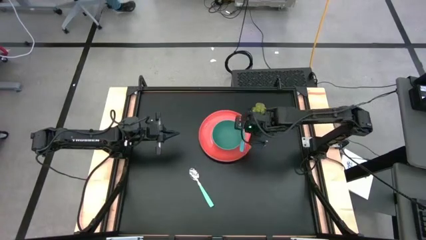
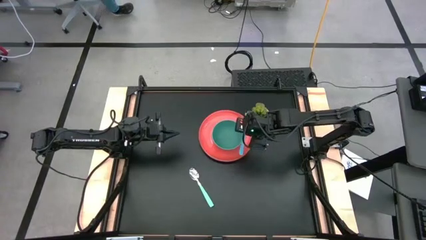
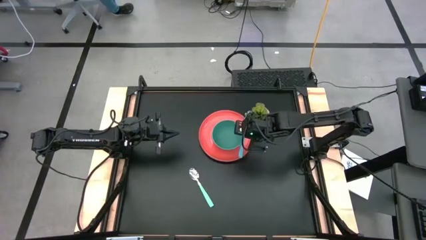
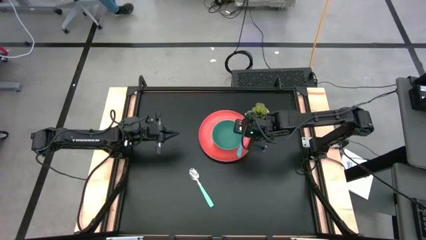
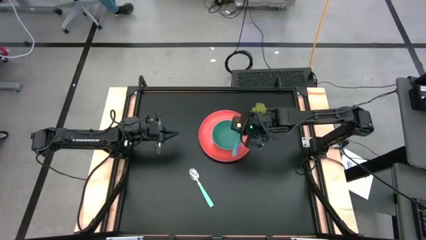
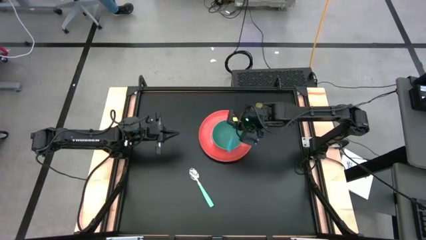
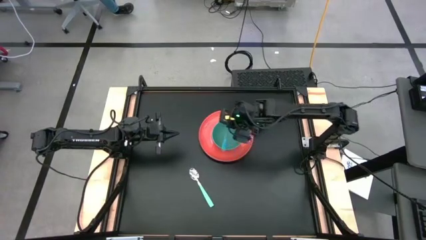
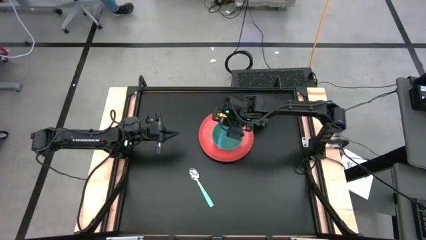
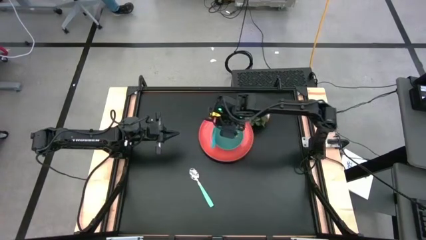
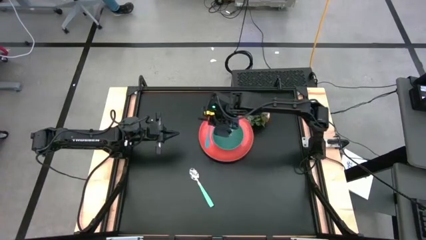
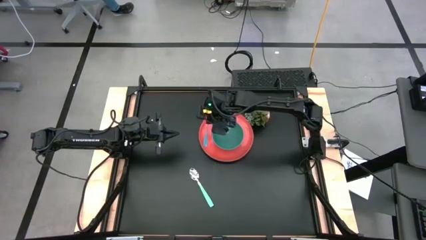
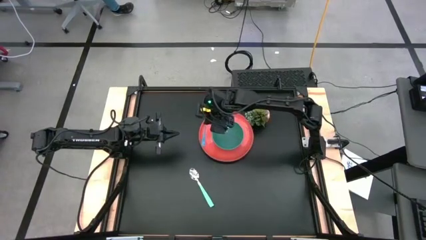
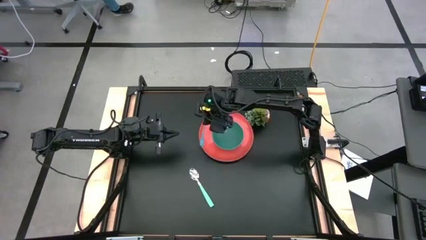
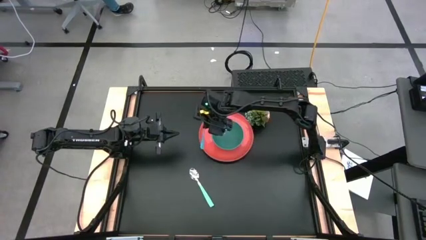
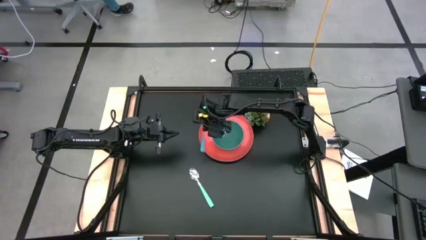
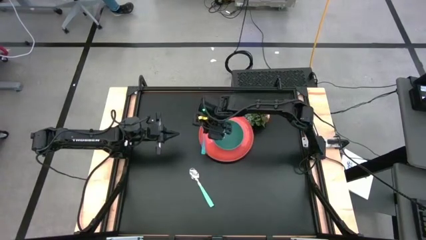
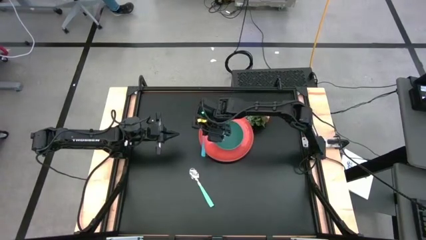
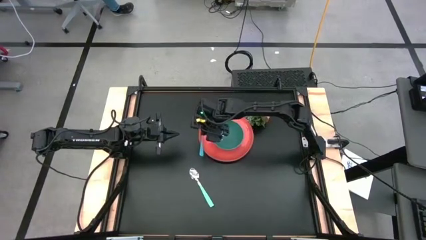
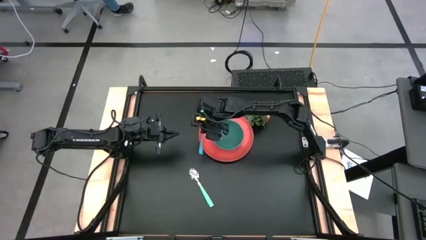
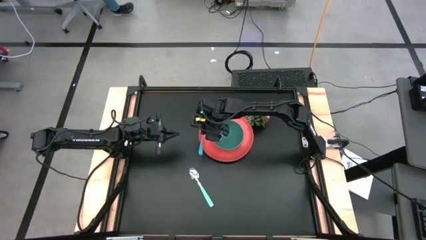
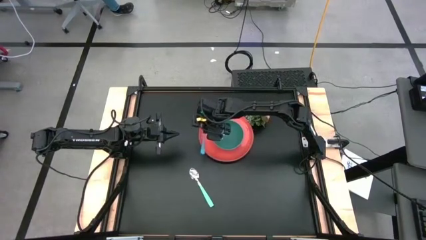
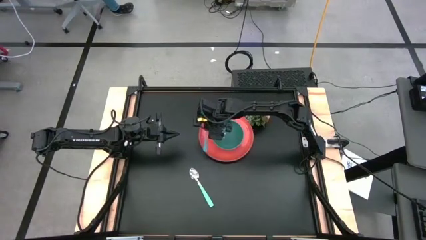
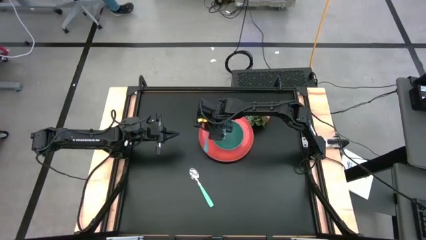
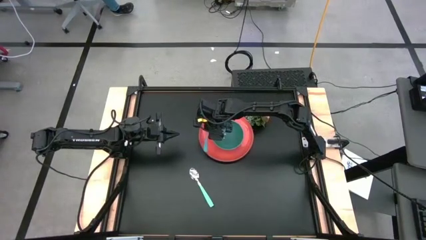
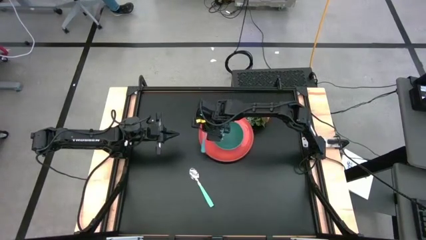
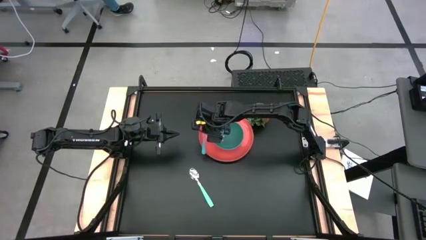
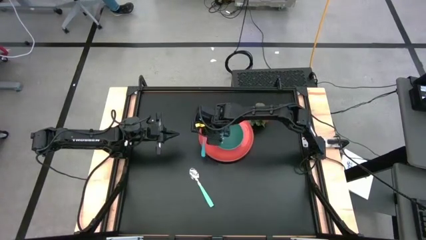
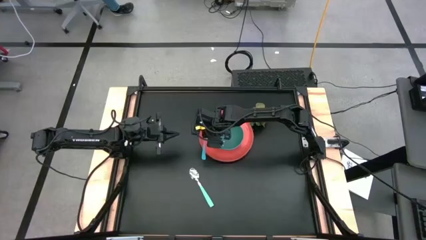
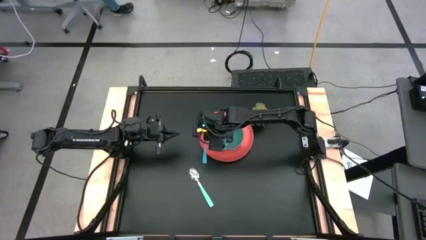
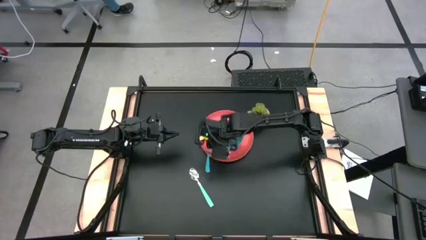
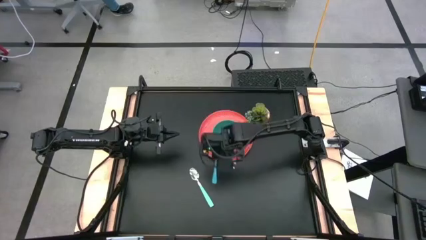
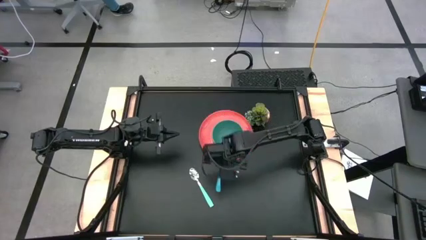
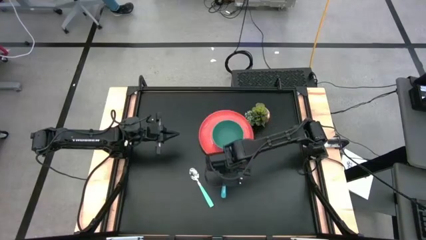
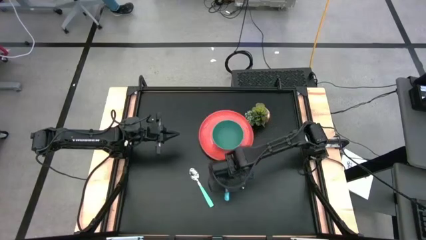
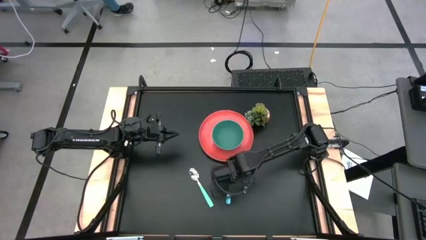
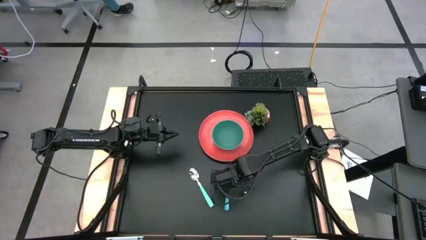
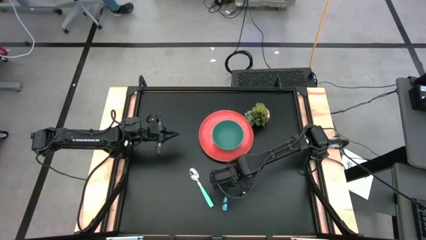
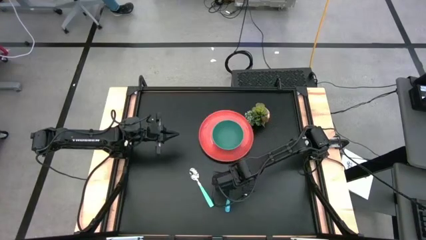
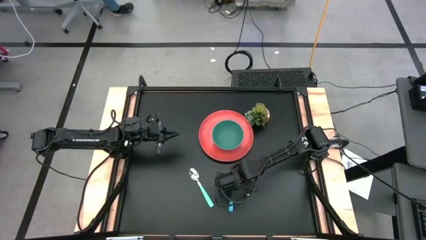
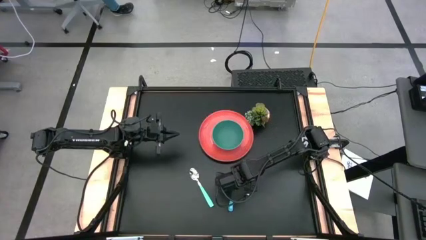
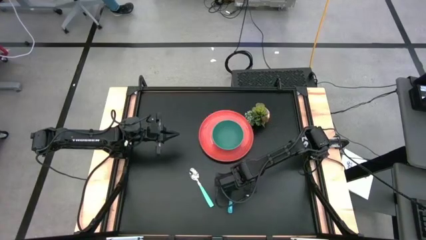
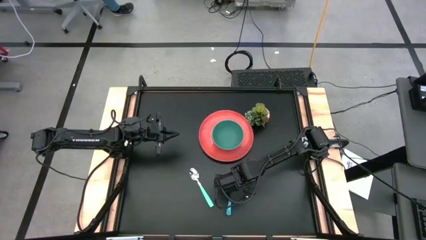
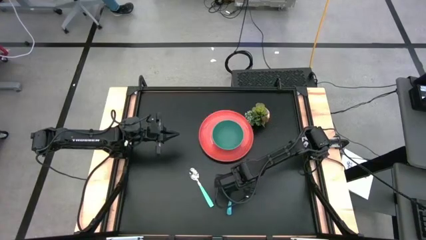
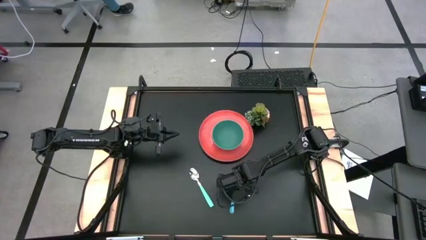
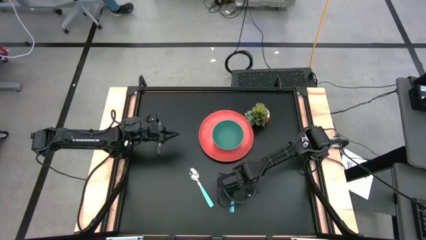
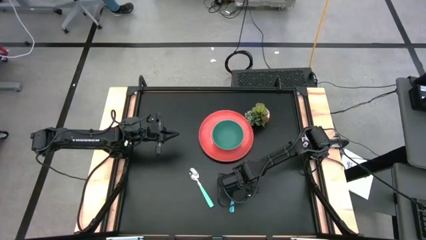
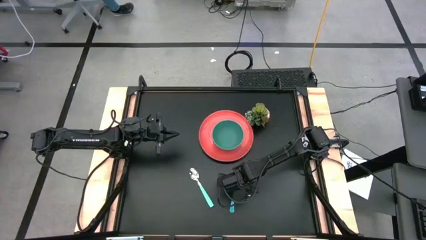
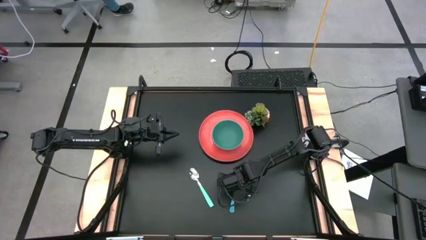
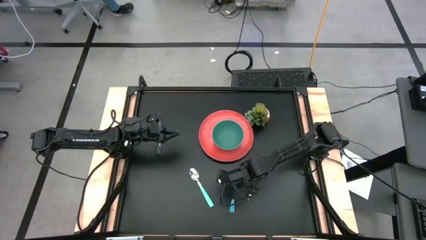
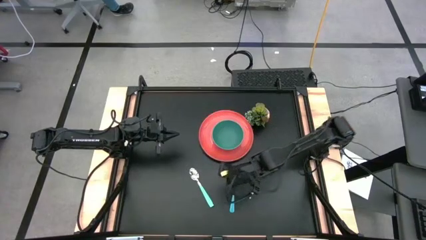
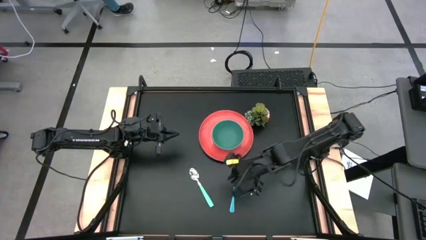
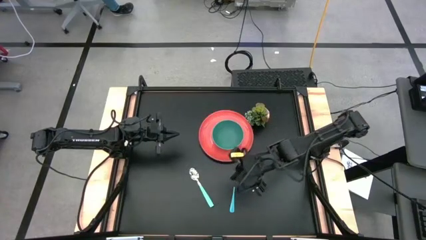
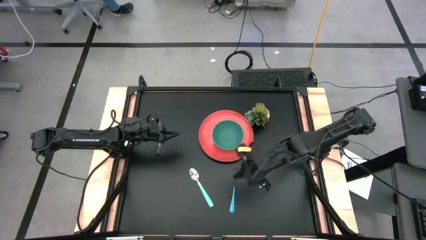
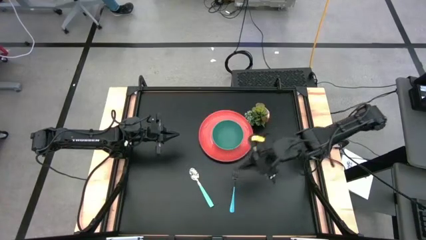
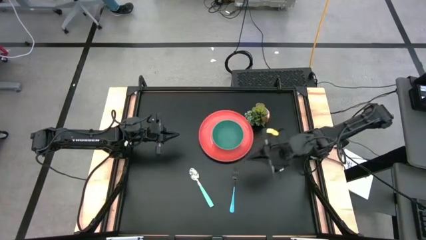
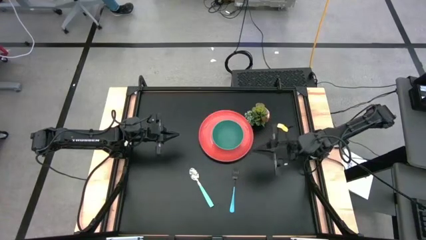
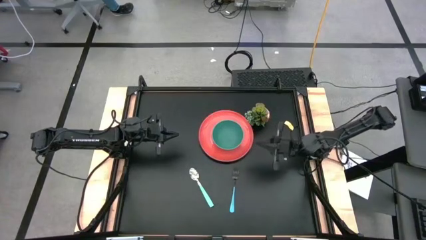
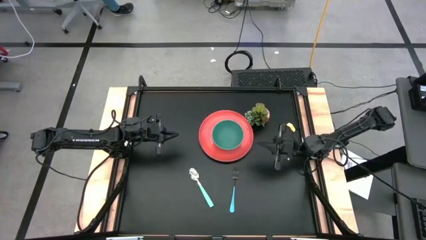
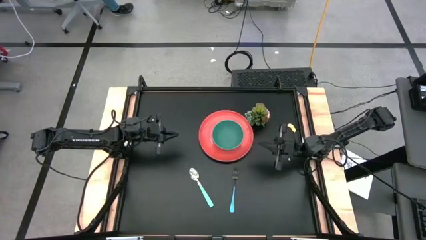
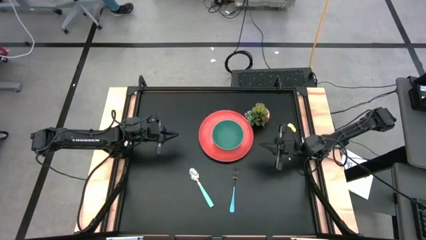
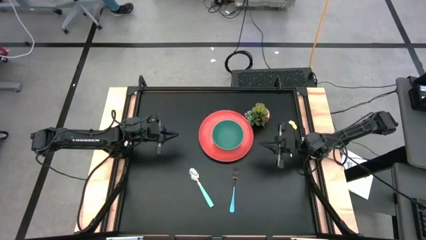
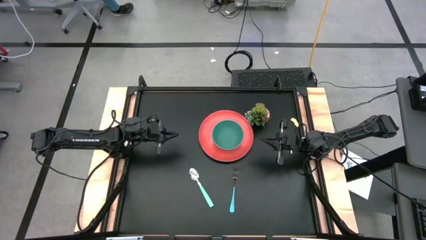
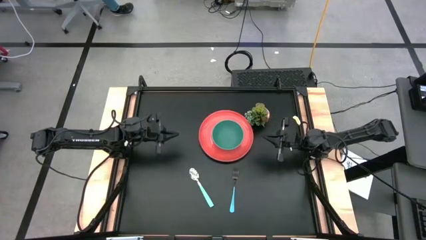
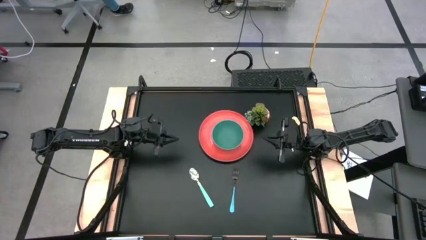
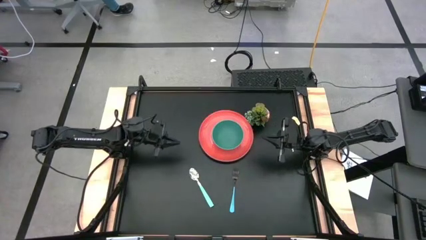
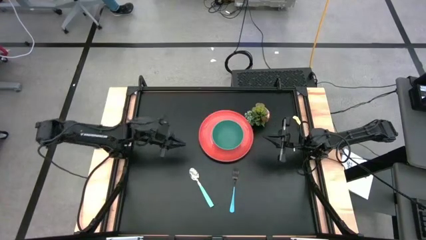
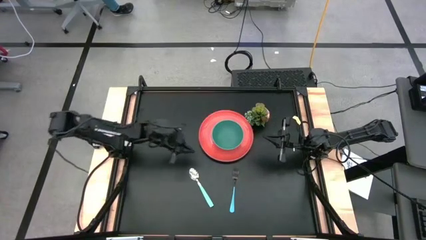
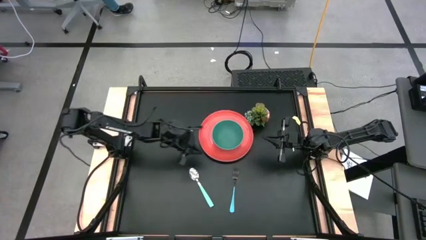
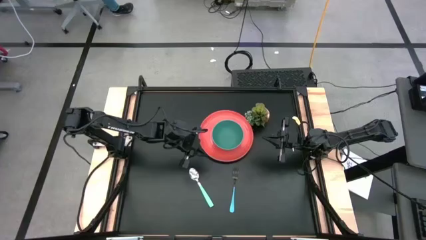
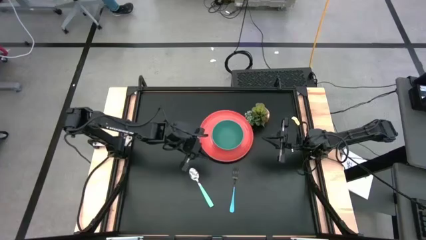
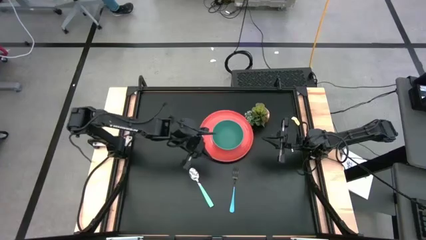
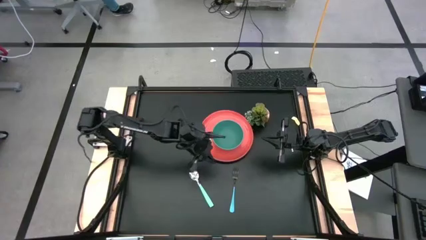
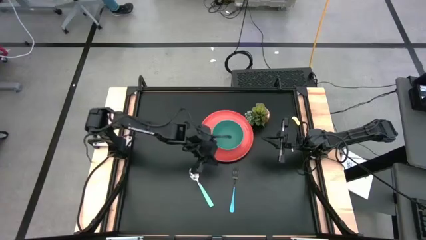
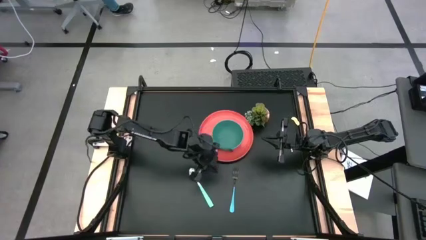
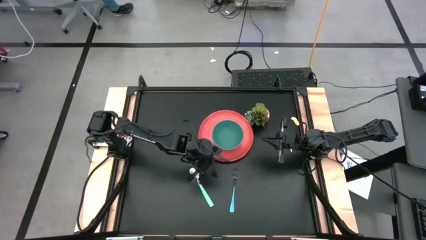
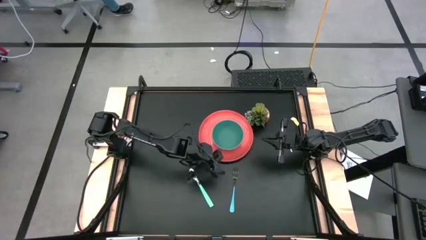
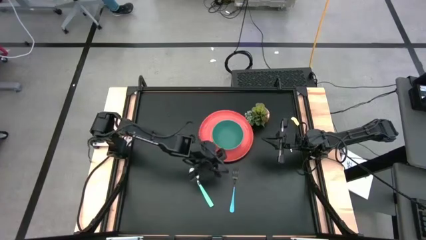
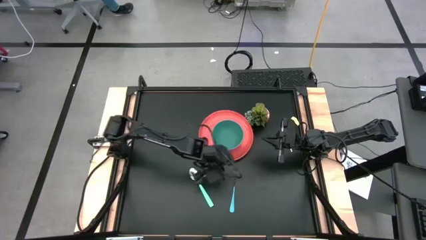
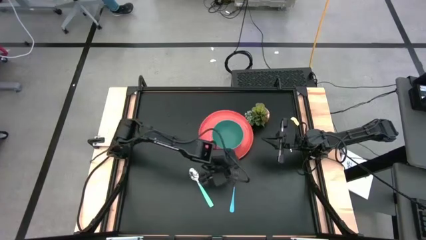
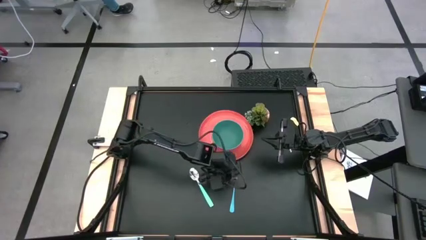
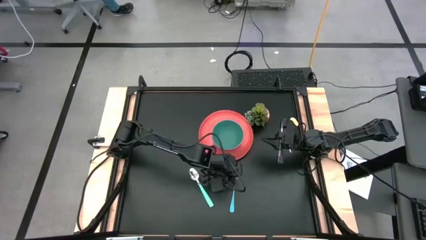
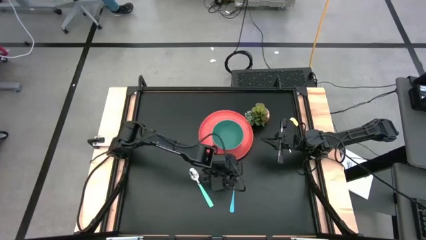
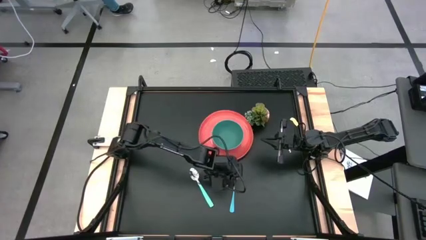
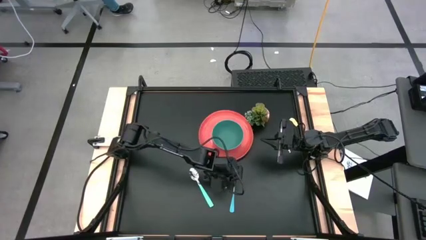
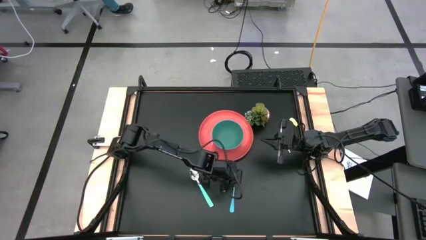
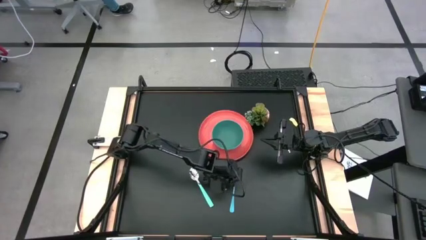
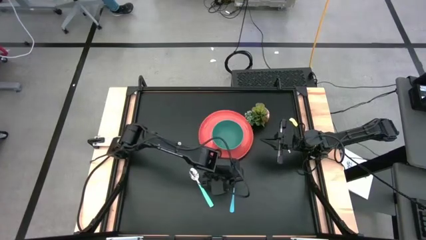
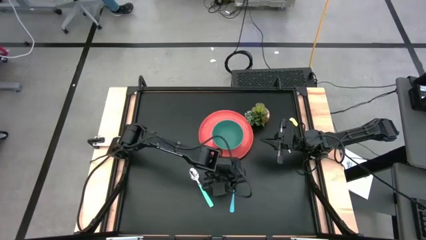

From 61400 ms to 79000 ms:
Task: Set table place
Put the blue fork on the right side of the green bowl
